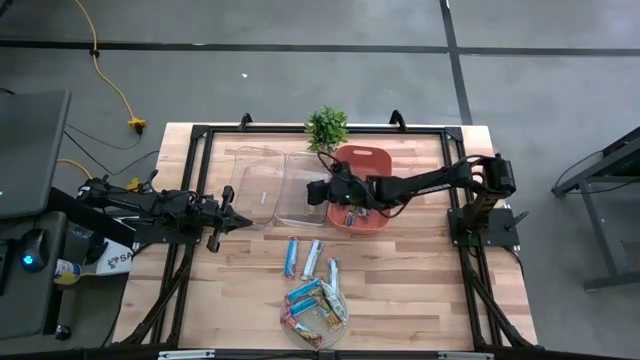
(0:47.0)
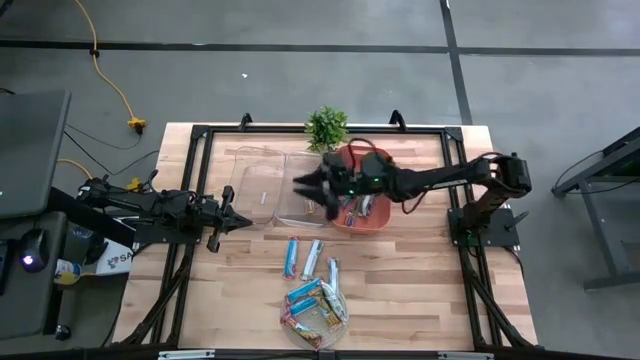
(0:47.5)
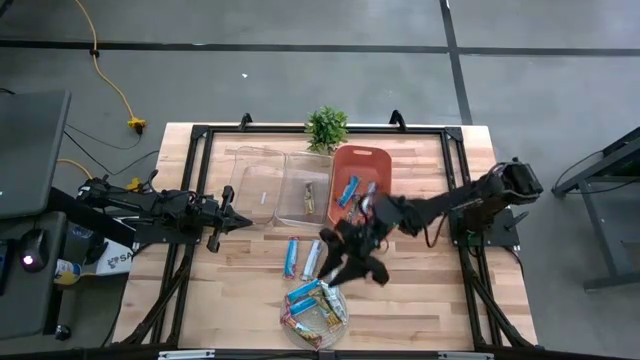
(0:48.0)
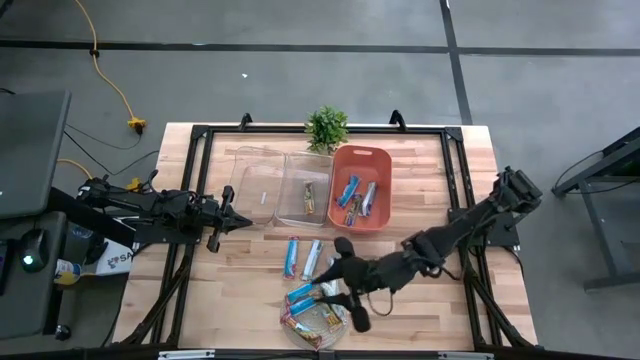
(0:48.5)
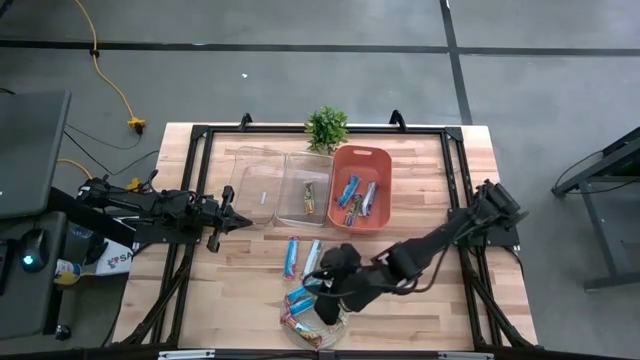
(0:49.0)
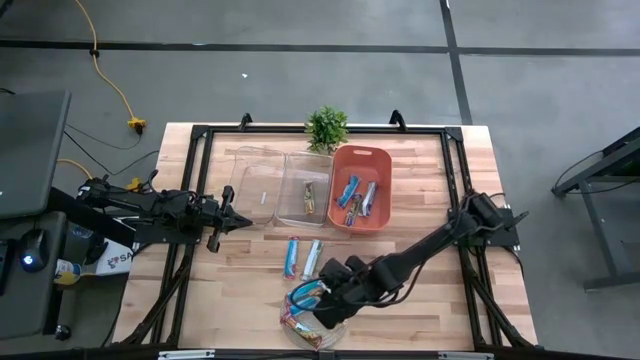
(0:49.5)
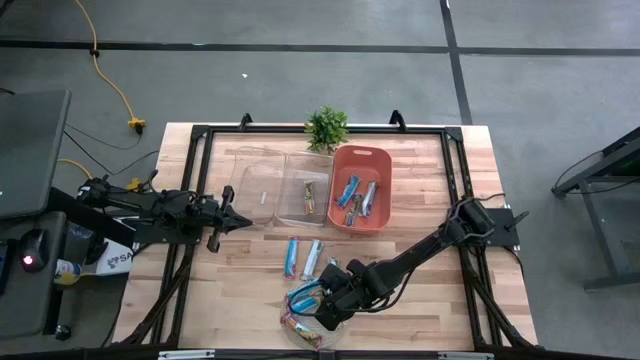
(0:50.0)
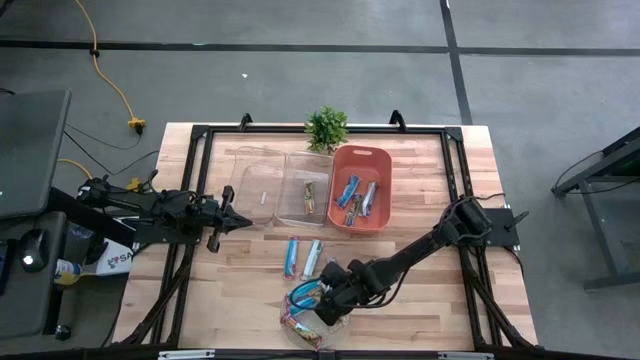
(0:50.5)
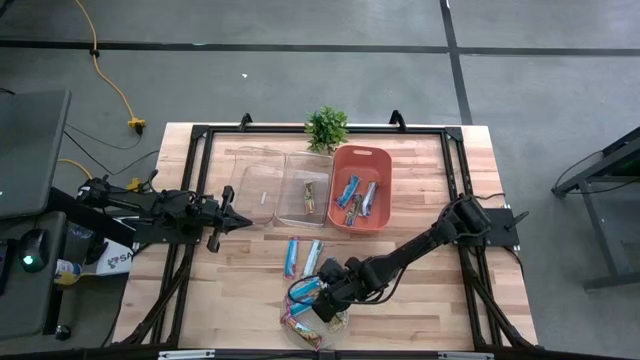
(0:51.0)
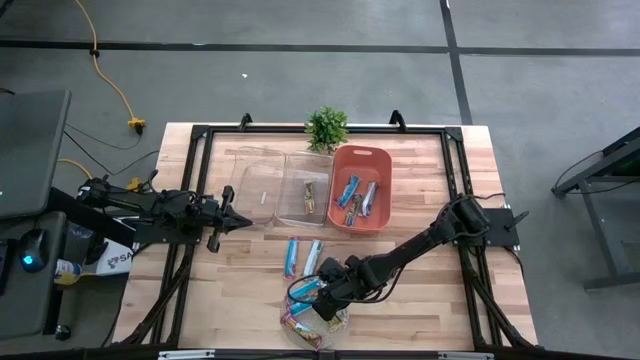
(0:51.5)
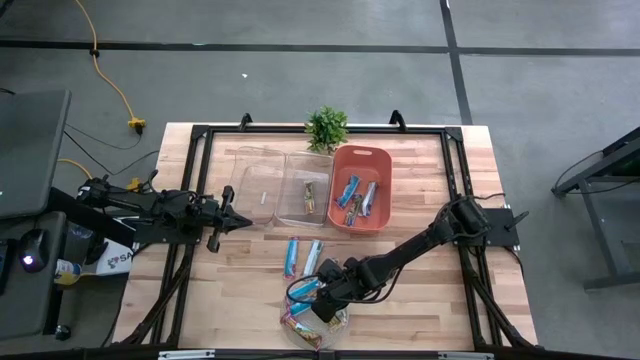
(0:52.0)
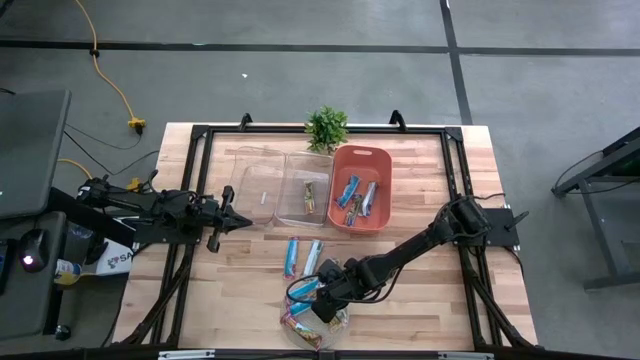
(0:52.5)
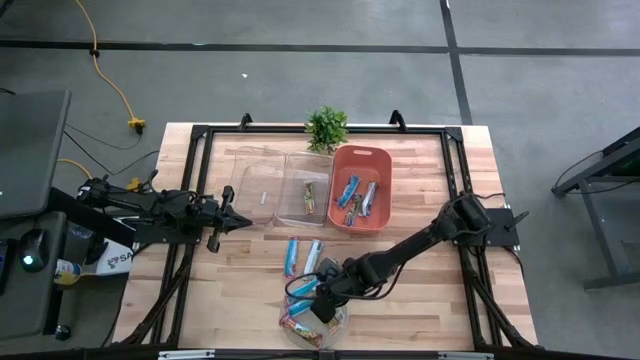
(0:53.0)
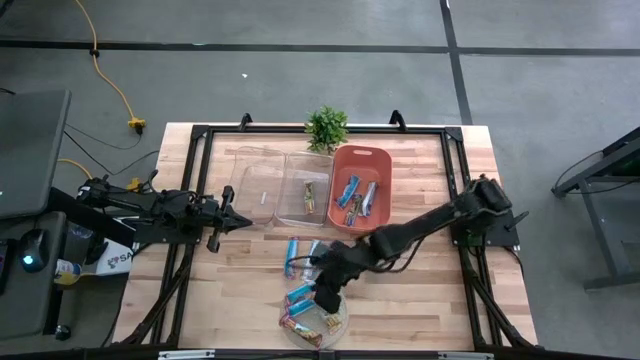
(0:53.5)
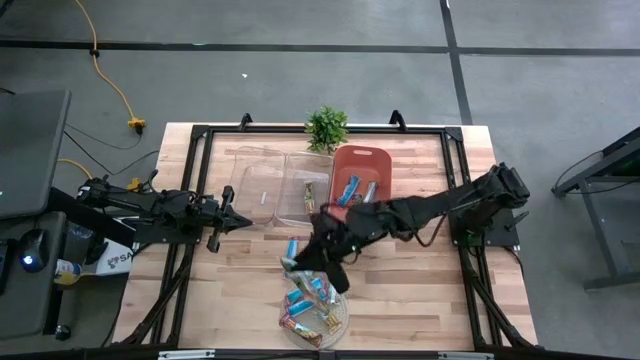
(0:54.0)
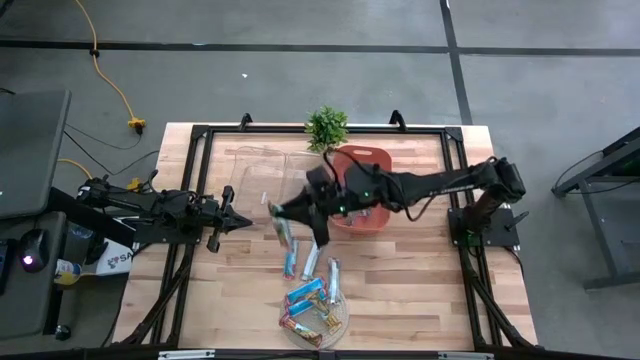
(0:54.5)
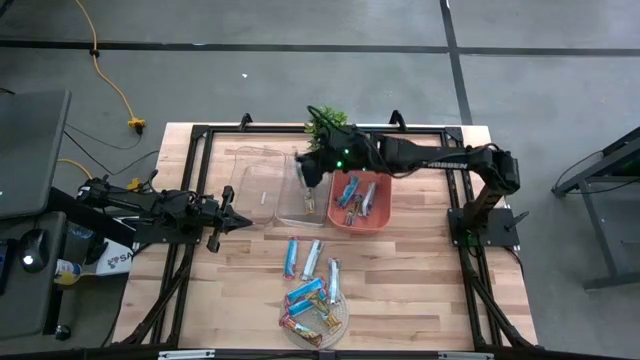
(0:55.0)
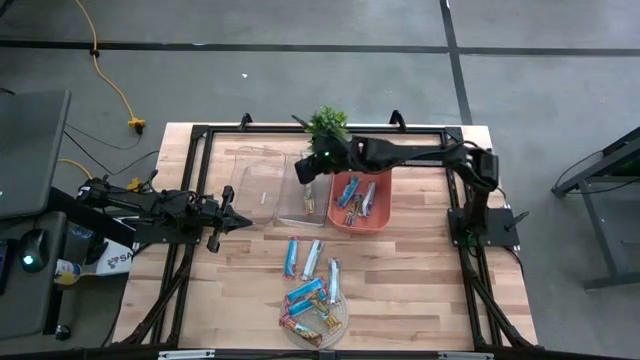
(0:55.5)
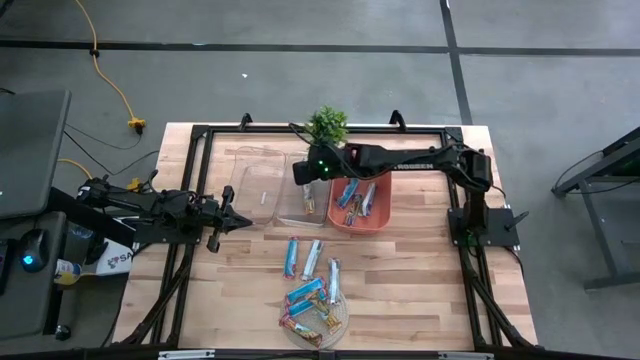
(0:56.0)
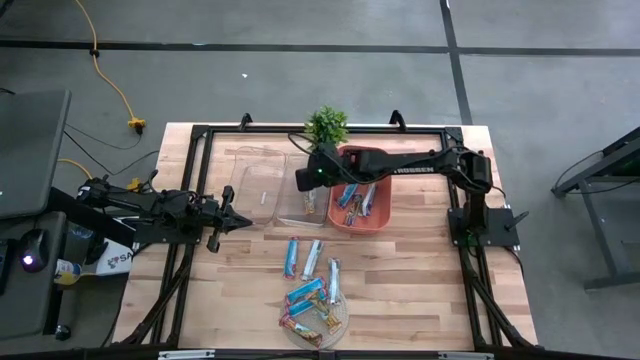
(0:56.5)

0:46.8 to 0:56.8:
Task: Pick and place Granola Bars by type
Put the yellow granola bar into the right transparent bin

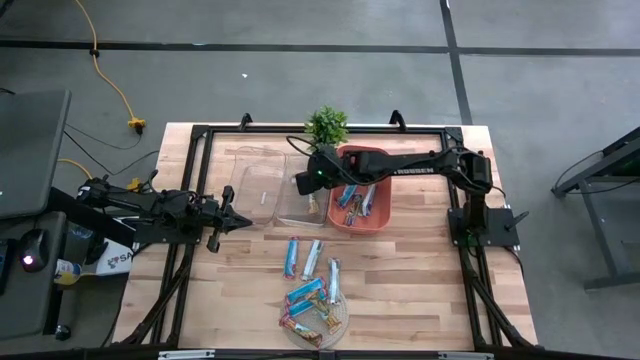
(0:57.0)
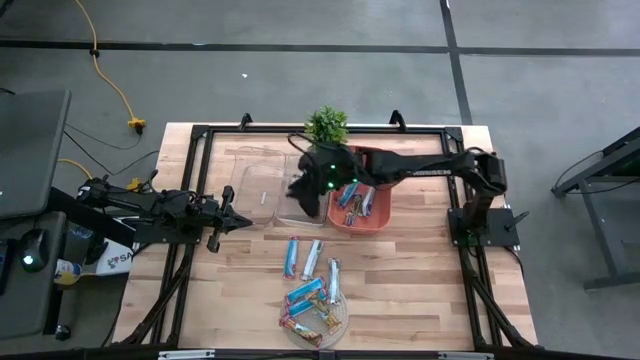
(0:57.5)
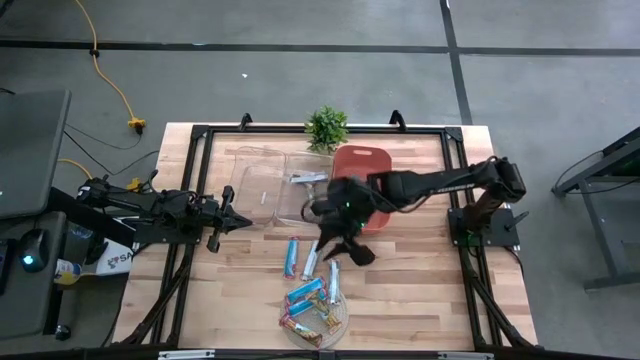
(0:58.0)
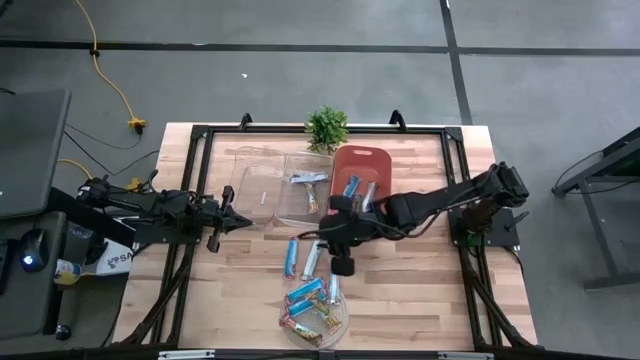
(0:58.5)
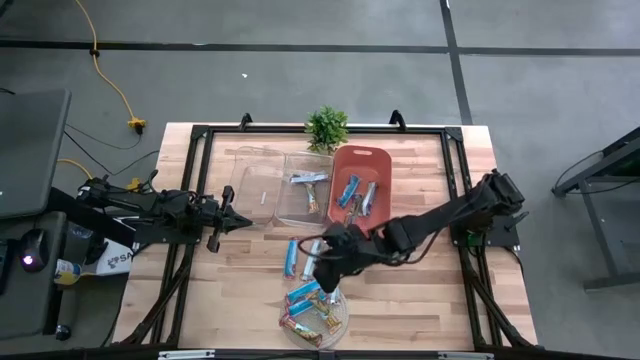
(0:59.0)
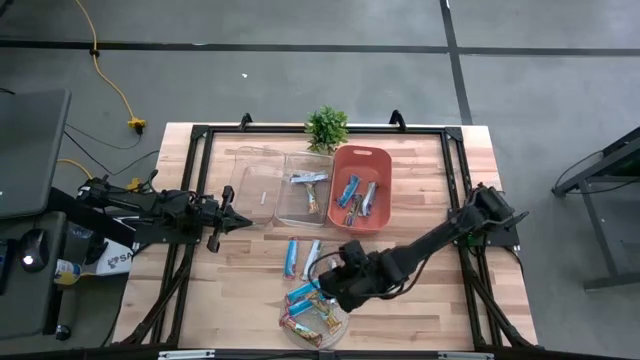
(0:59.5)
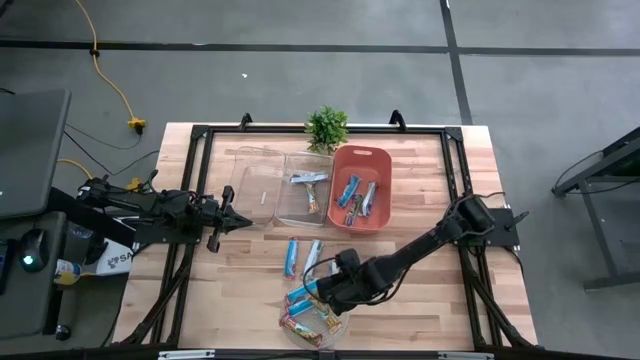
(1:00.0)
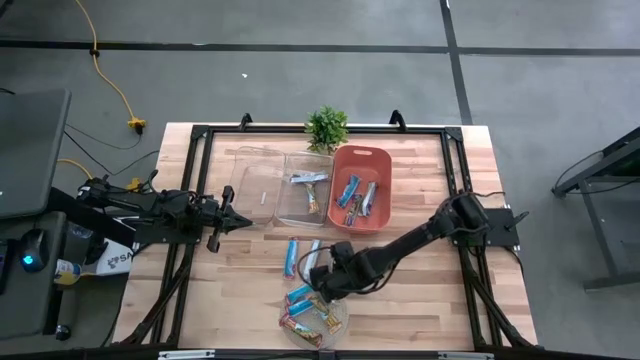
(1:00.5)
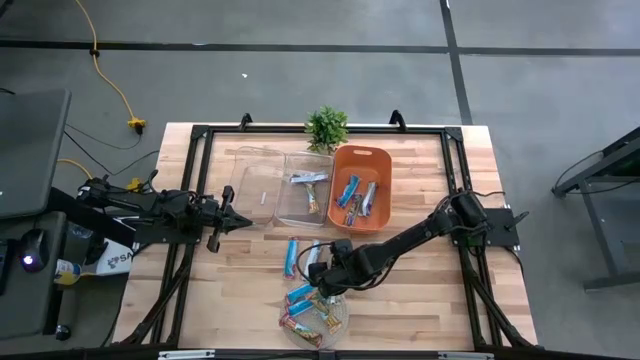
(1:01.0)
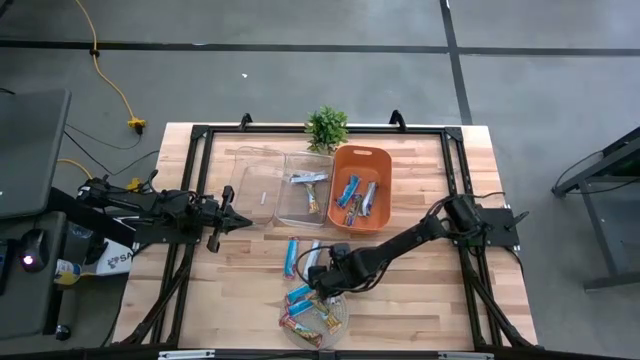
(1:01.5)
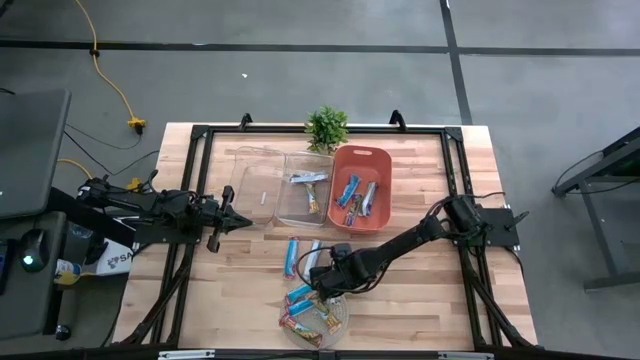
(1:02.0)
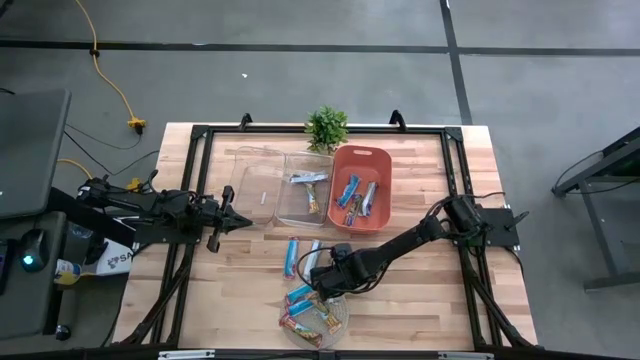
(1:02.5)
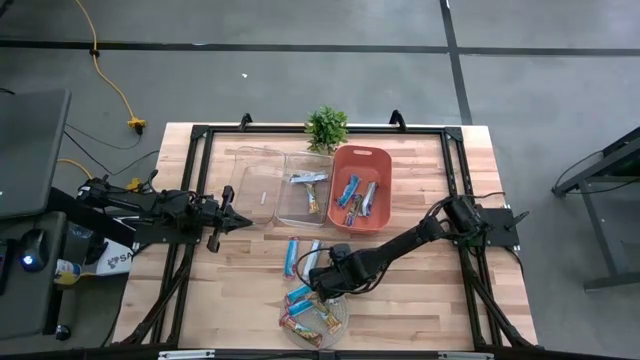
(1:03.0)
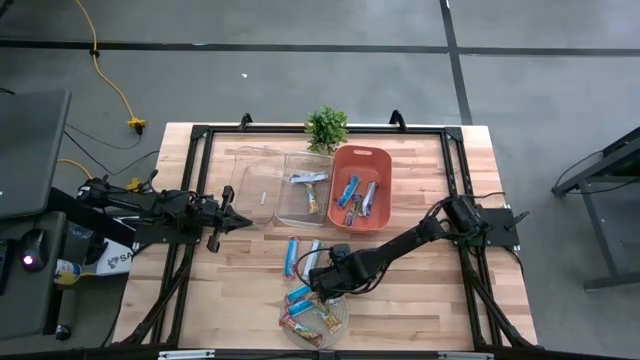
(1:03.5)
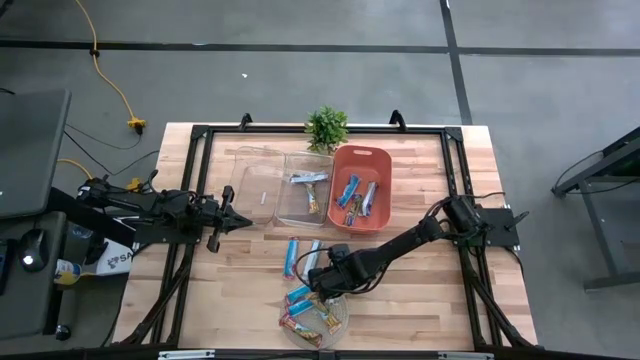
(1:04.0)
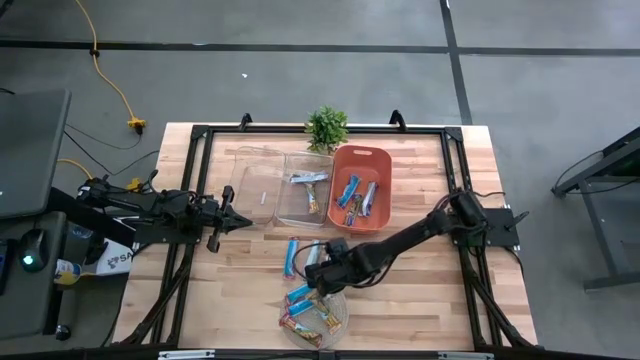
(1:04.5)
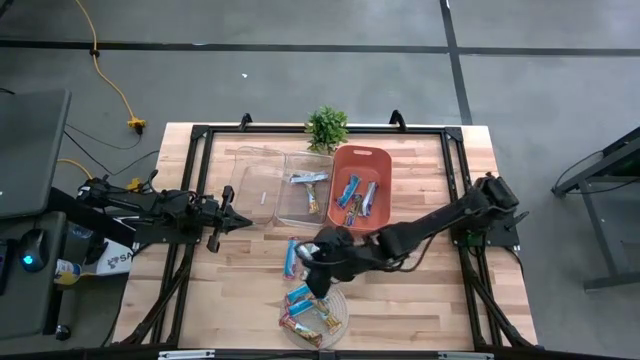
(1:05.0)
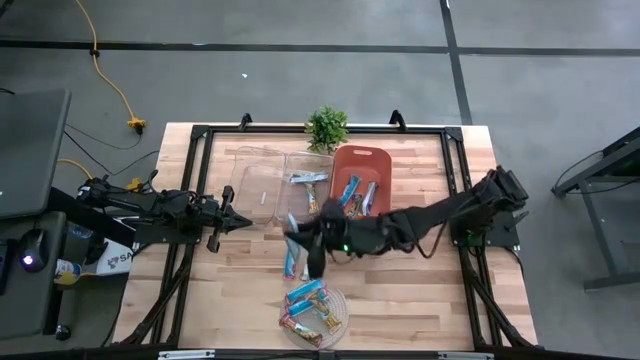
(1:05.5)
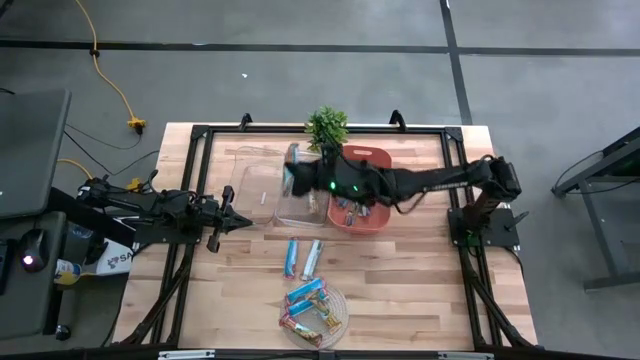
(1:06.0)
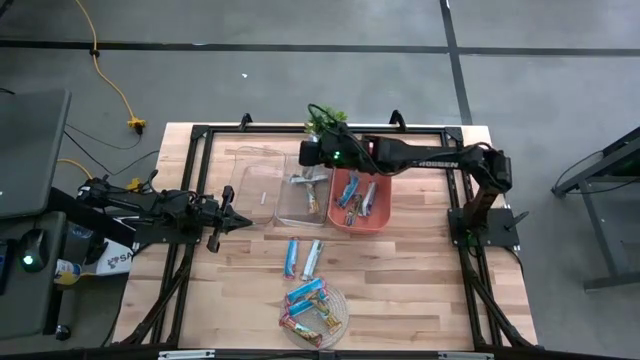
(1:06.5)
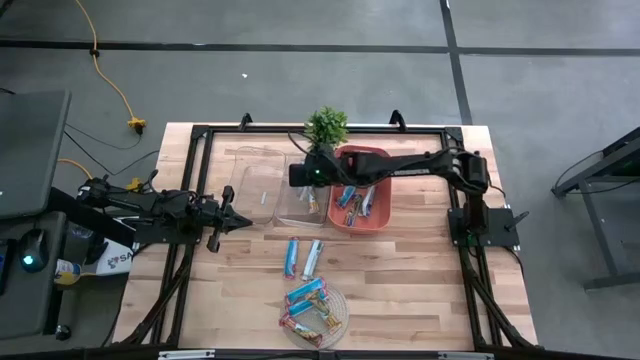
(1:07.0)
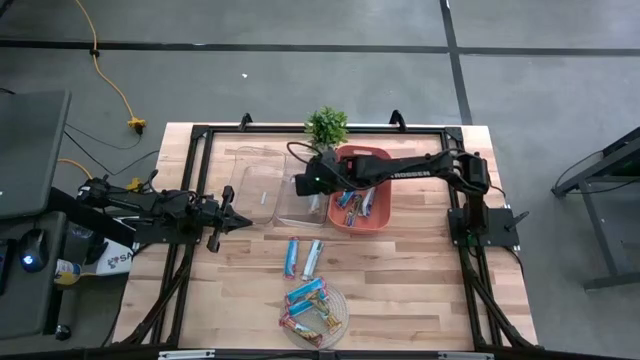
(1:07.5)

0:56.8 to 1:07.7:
Put the middle yellow granola bar into the right transparent bin
